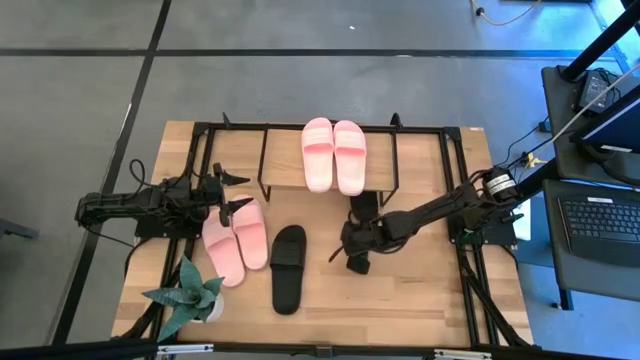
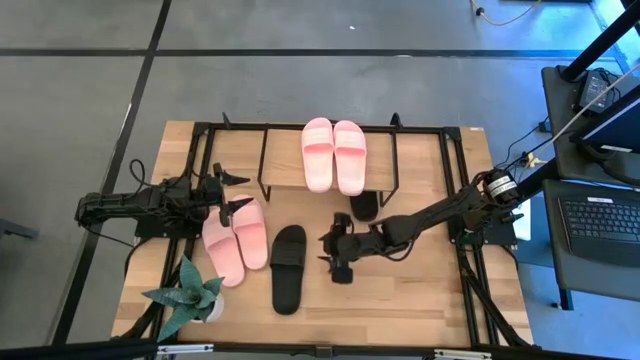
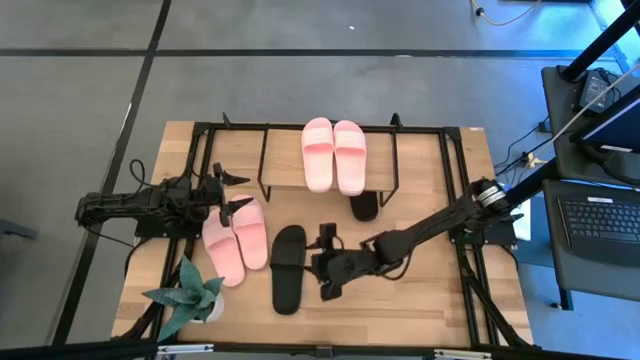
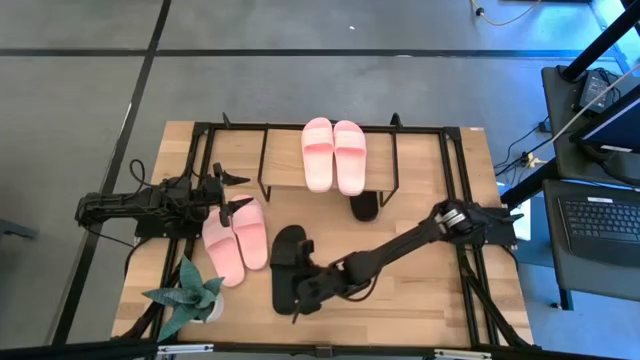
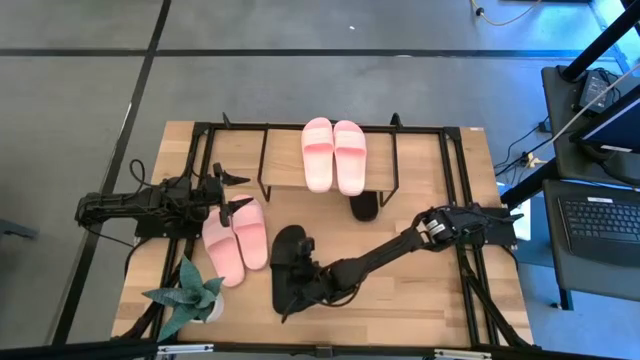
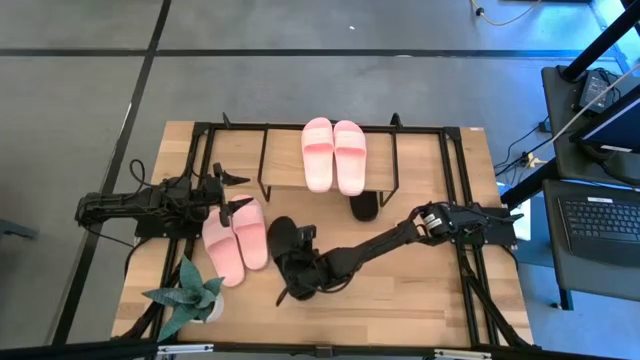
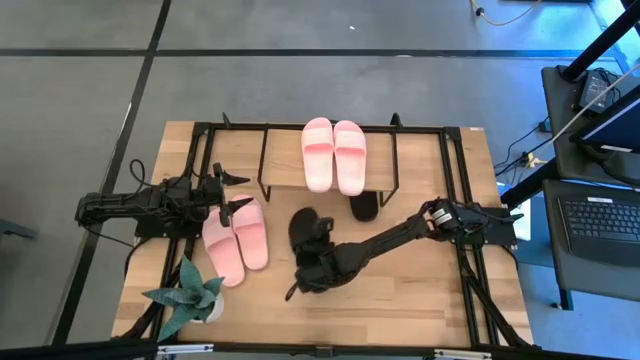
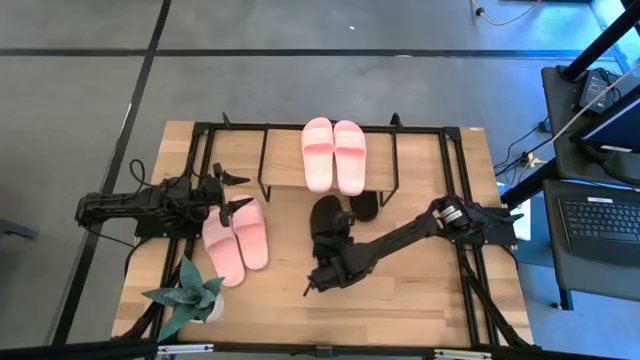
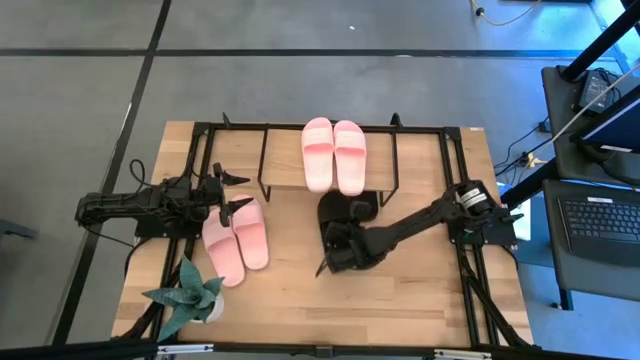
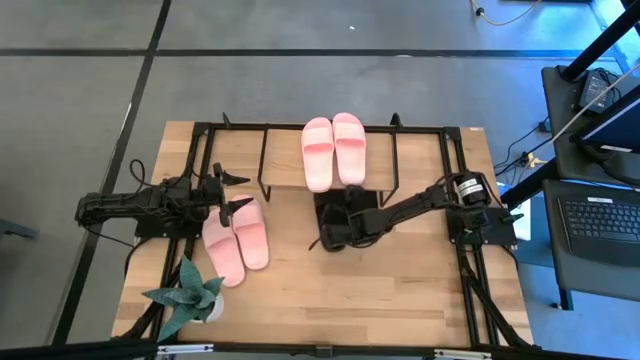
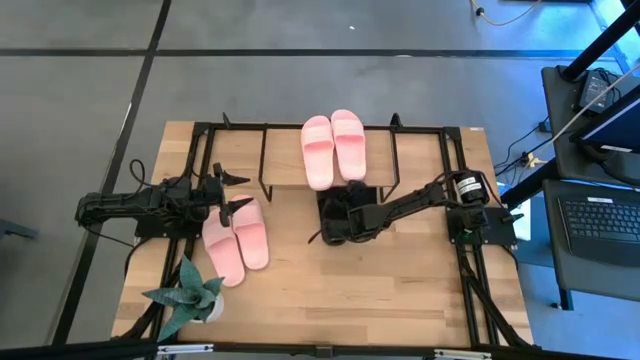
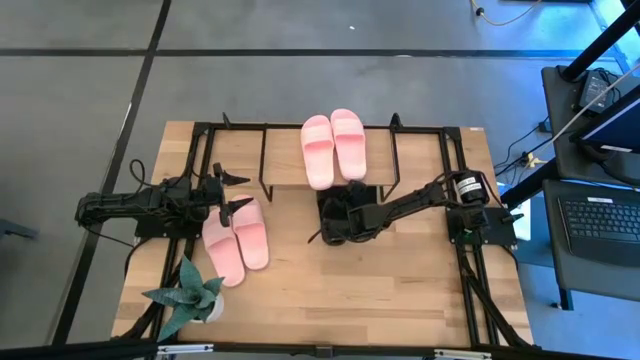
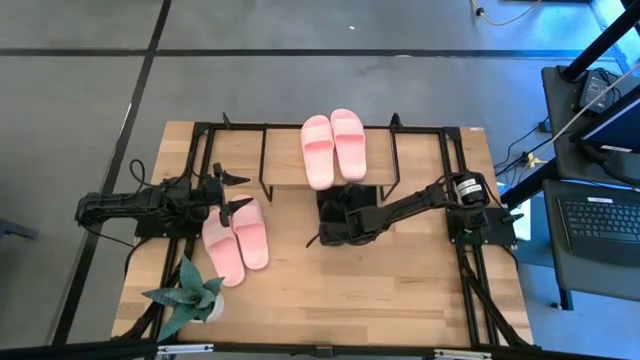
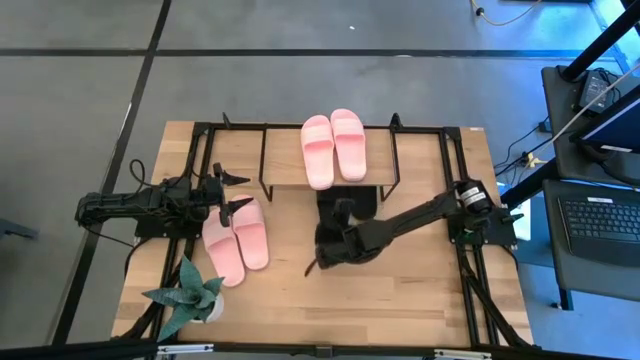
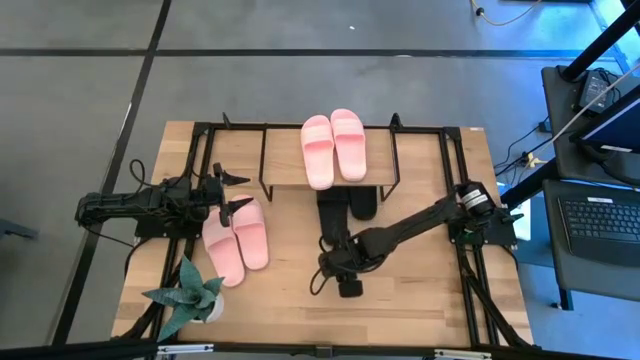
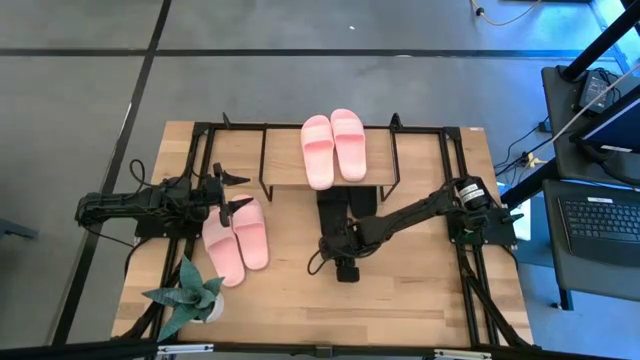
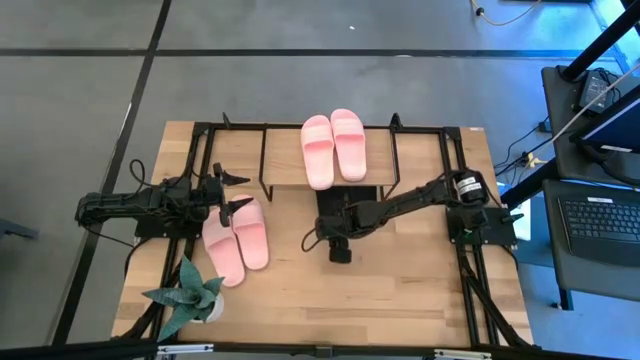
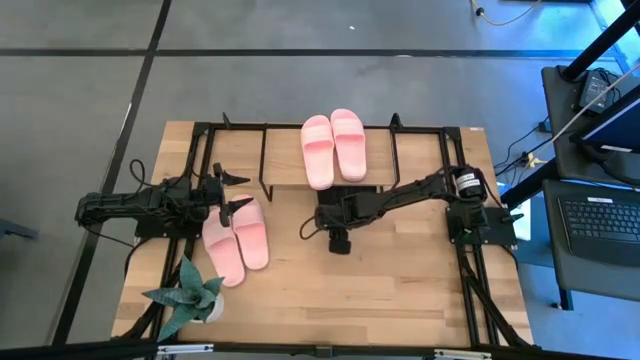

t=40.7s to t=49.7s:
Task: Pick and place slides into the shelf
Put the black slide under the shelf

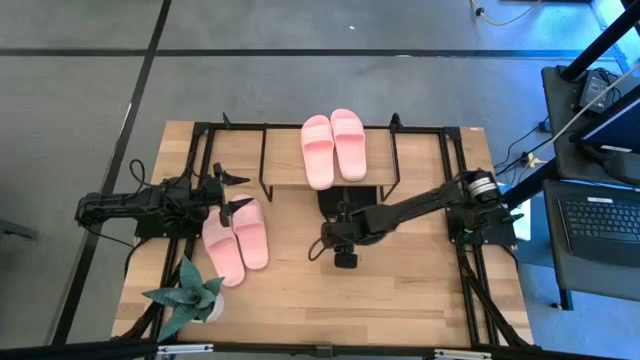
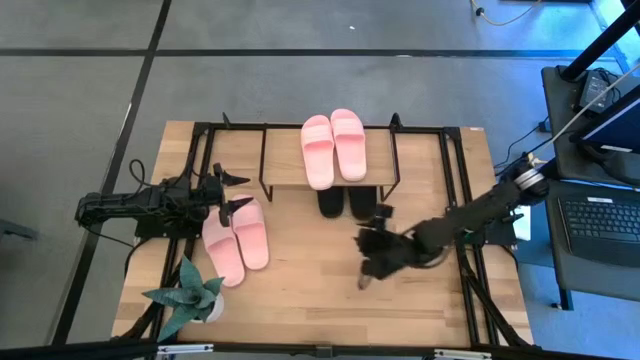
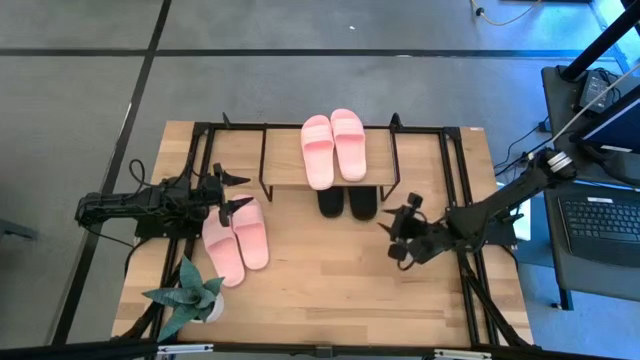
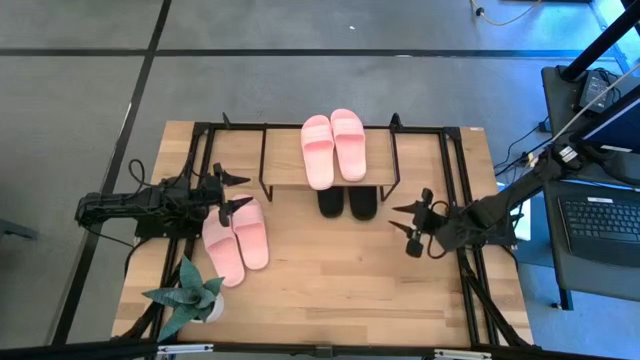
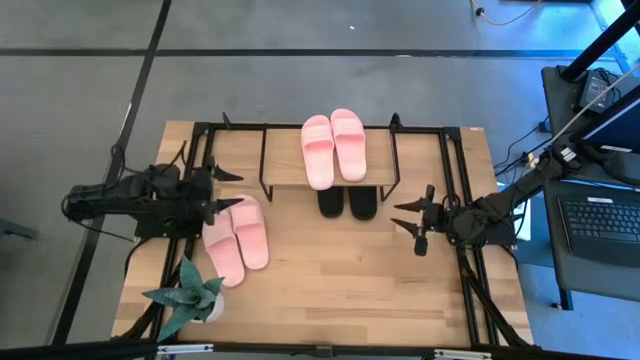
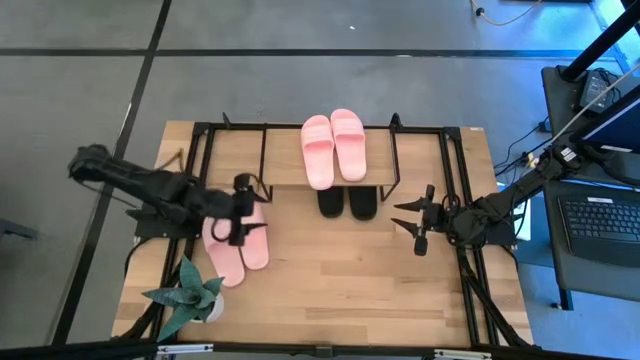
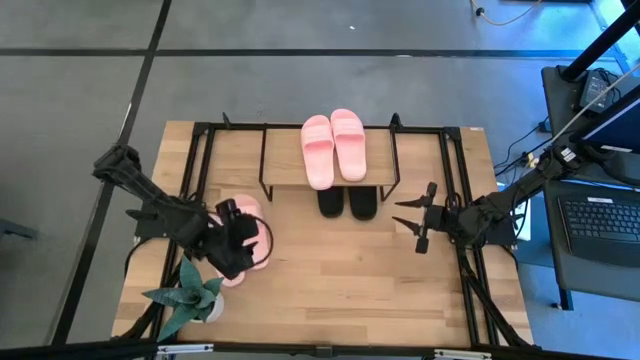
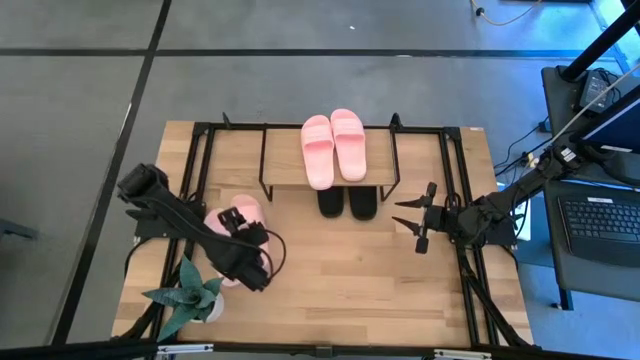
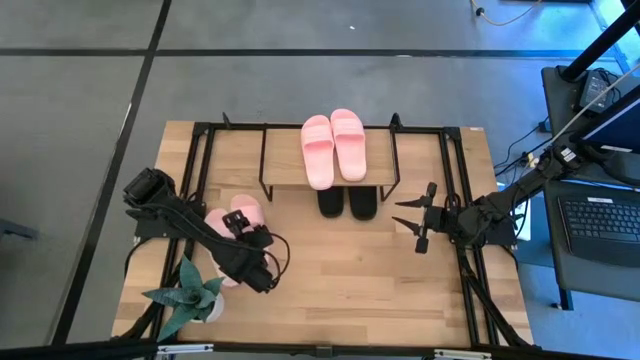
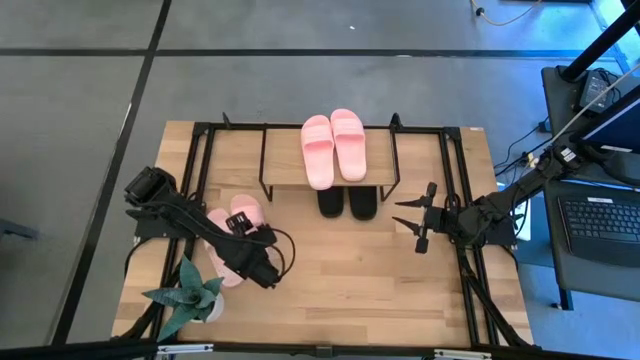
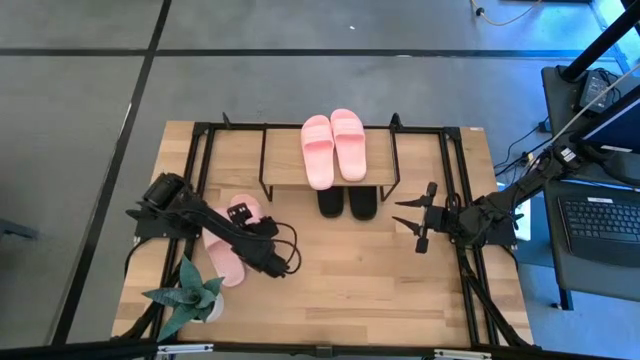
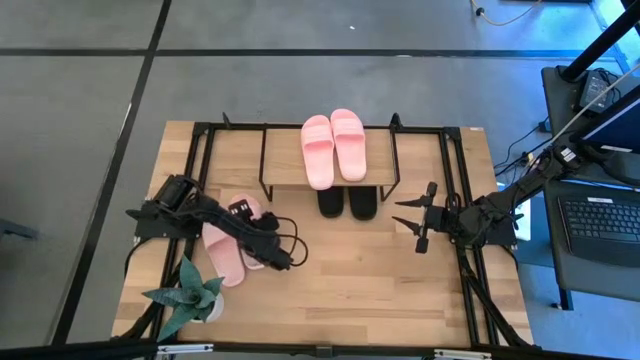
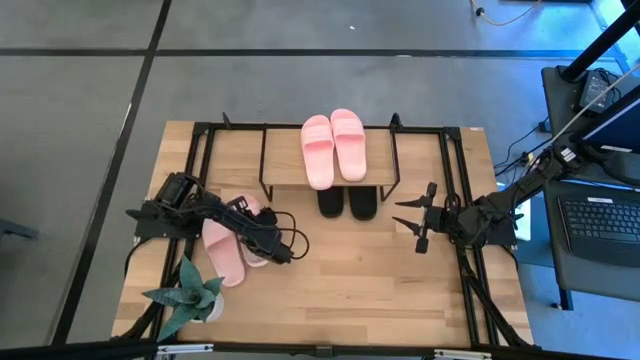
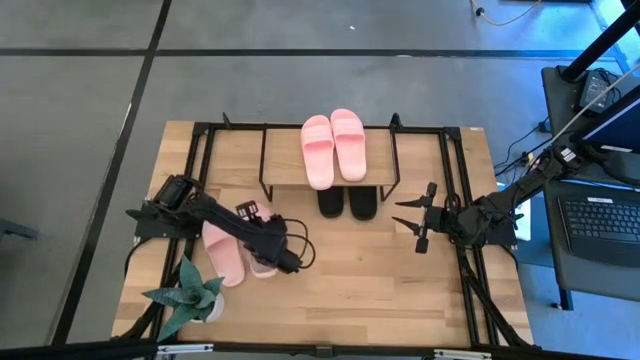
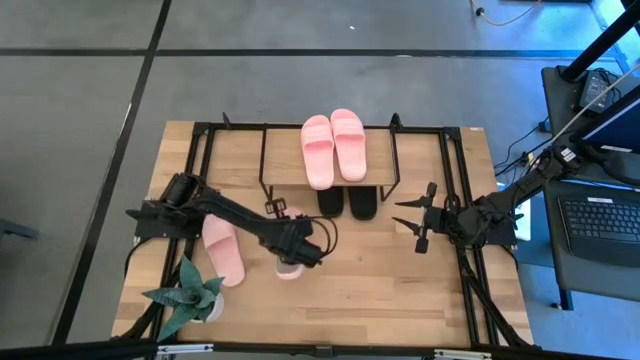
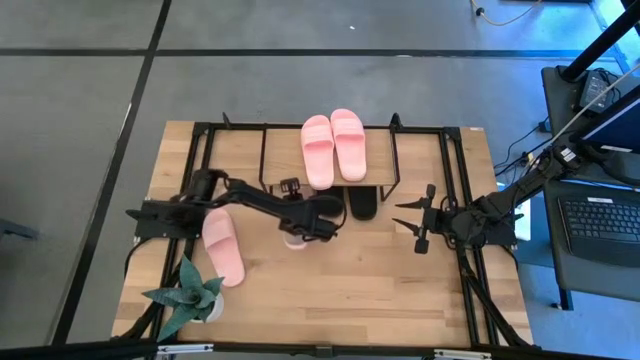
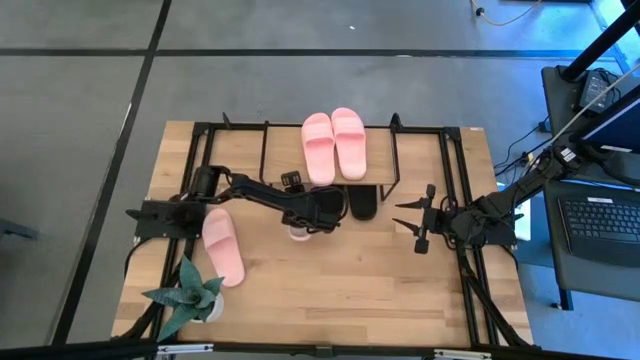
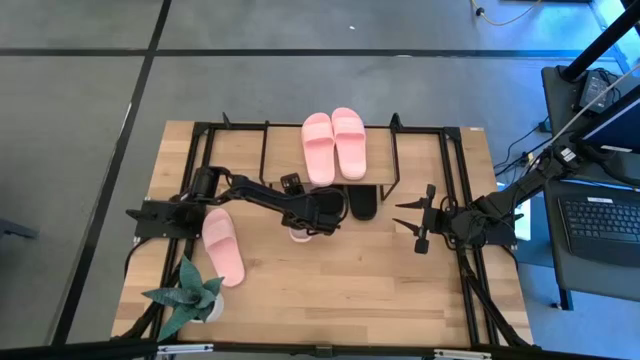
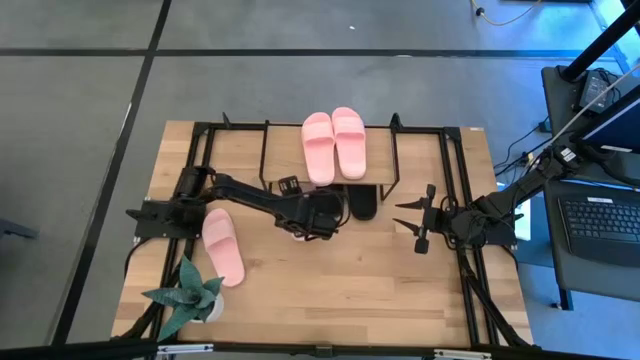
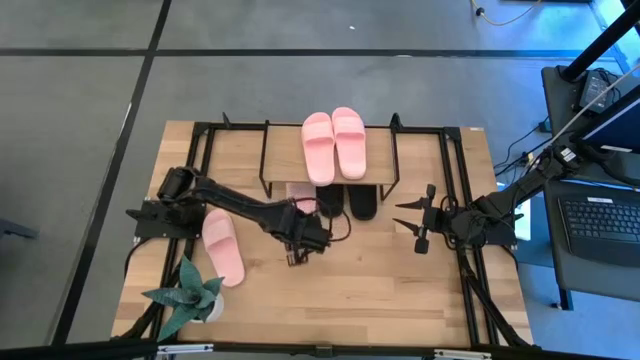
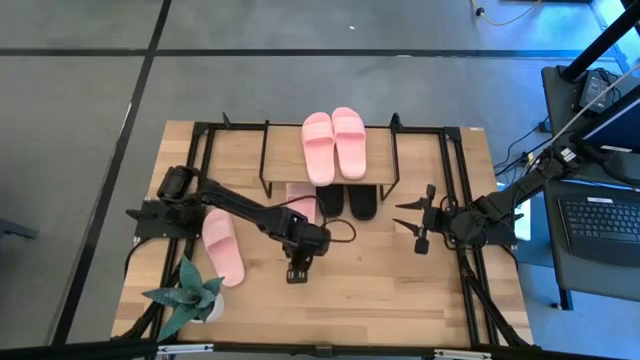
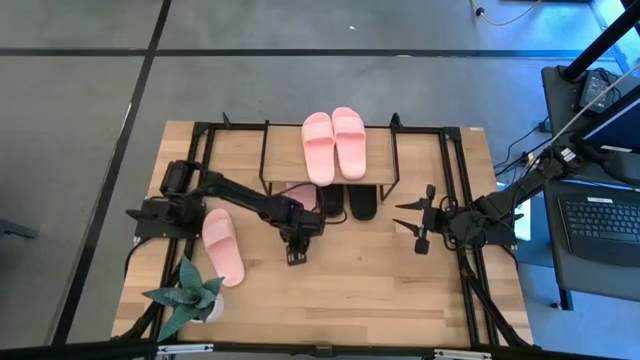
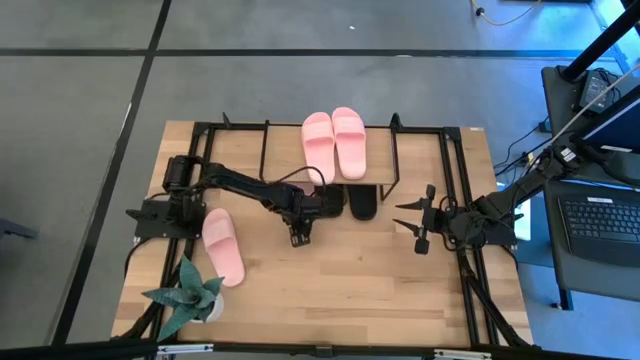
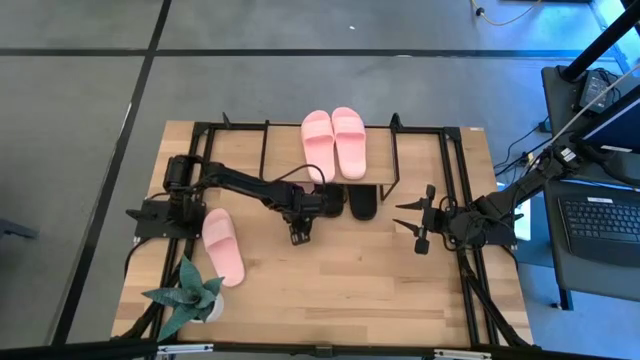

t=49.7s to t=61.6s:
Put the pink slide under the shelf

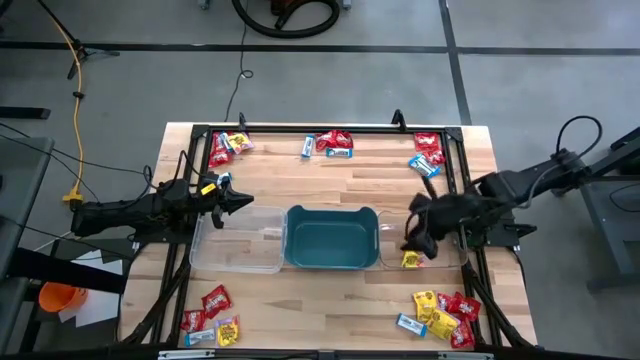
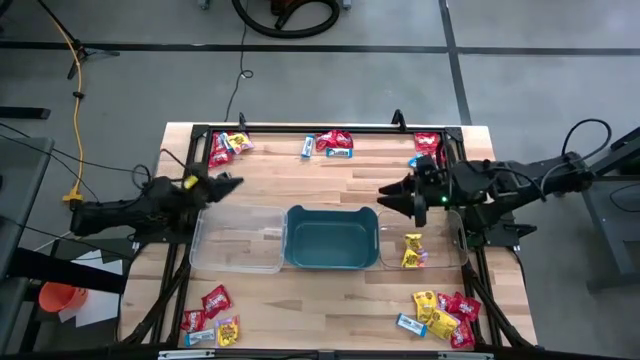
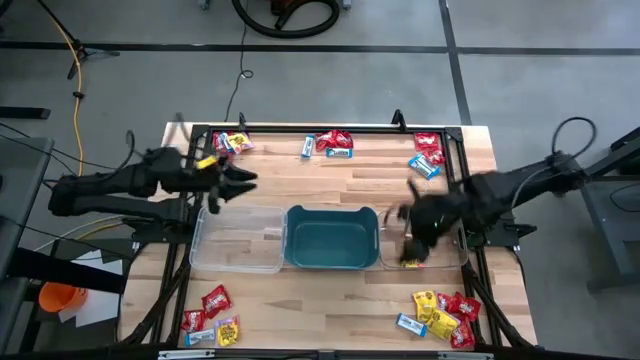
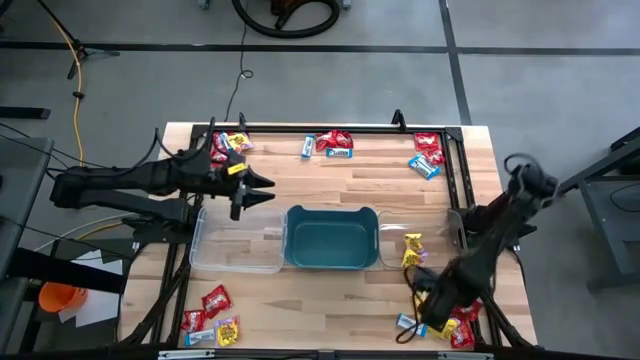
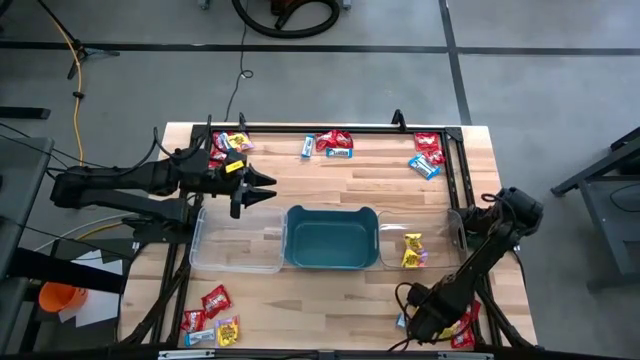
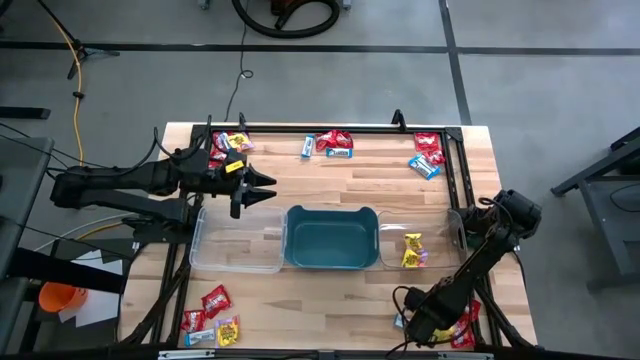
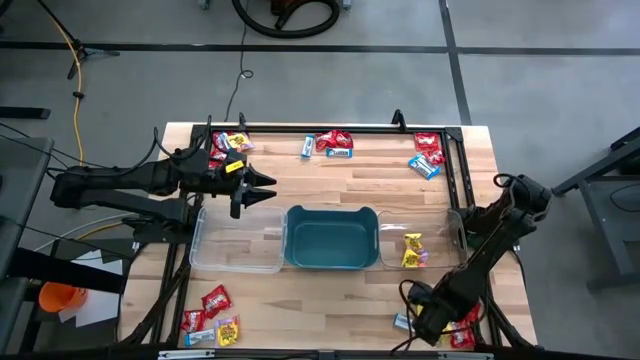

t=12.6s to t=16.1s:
Task: Sort candy
Put the yellow candy into the right transparent bin
